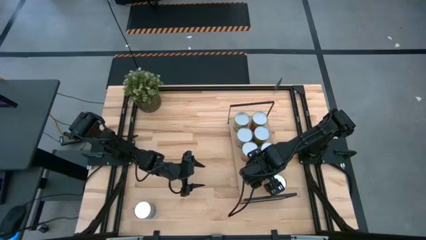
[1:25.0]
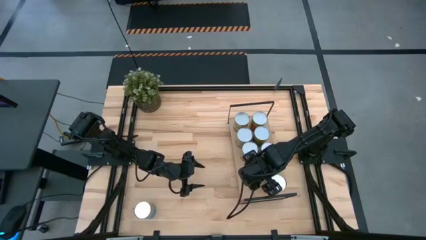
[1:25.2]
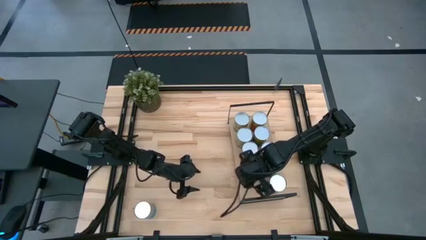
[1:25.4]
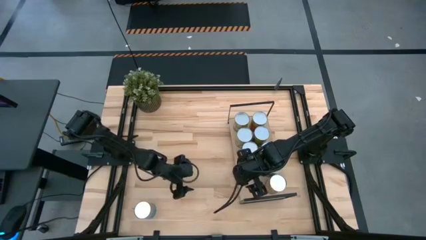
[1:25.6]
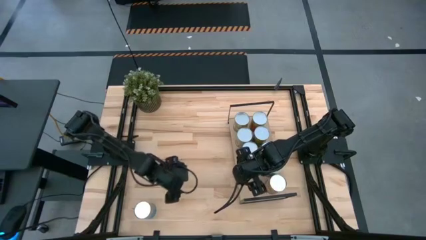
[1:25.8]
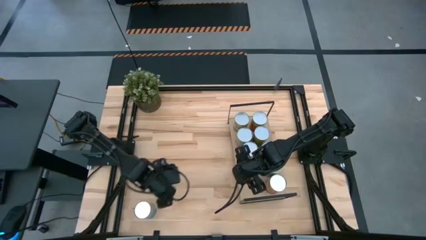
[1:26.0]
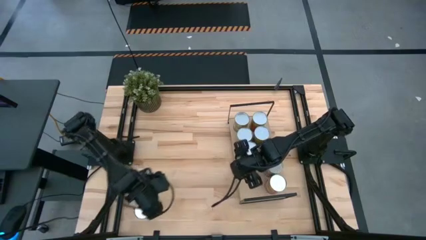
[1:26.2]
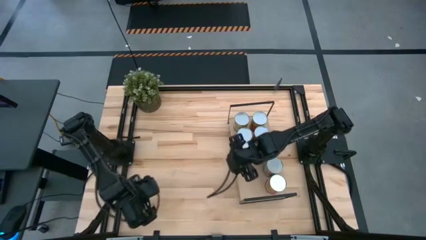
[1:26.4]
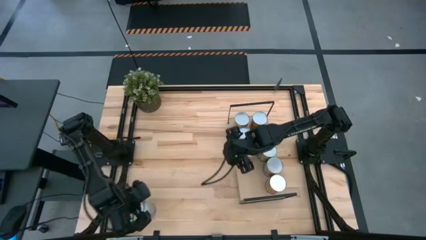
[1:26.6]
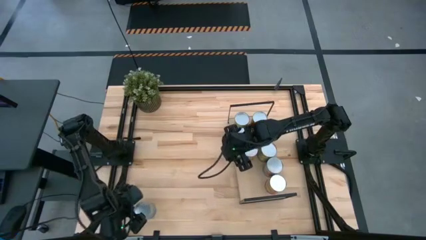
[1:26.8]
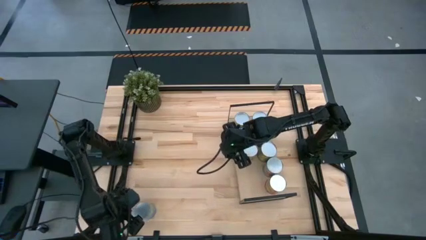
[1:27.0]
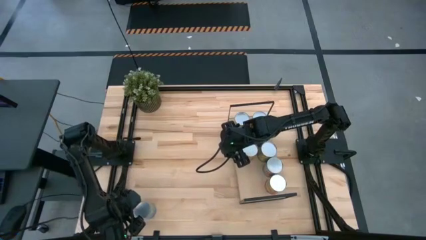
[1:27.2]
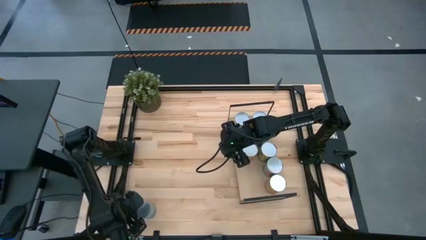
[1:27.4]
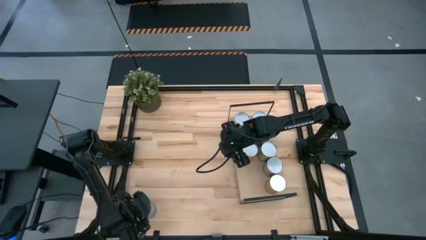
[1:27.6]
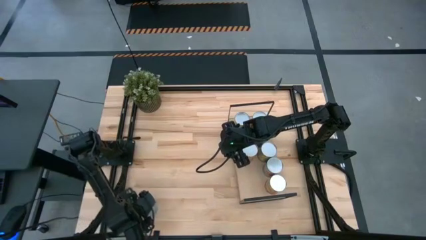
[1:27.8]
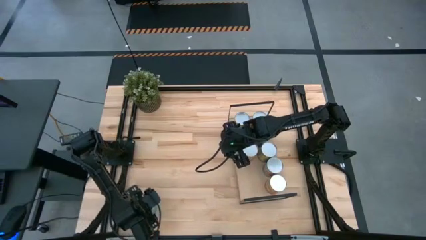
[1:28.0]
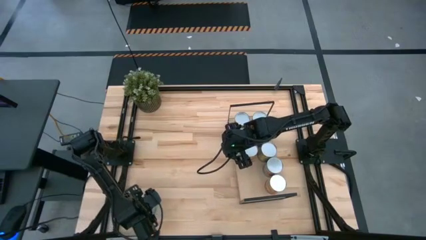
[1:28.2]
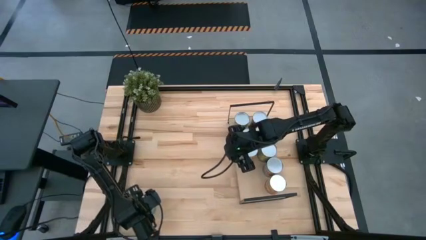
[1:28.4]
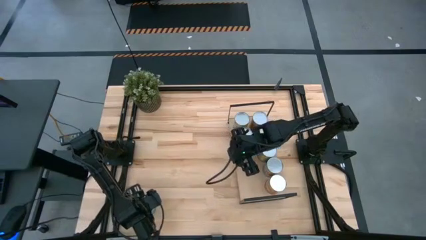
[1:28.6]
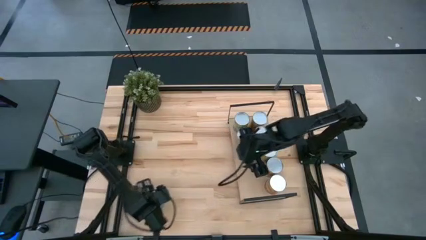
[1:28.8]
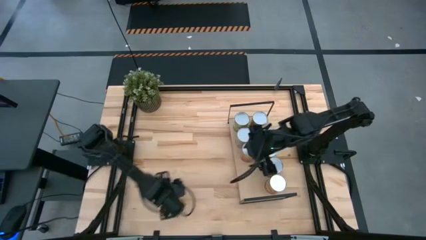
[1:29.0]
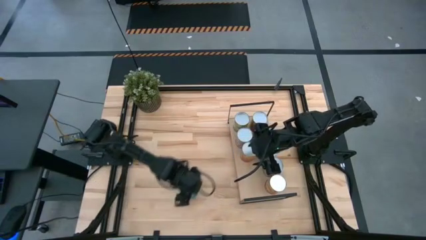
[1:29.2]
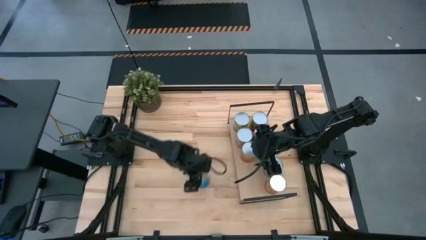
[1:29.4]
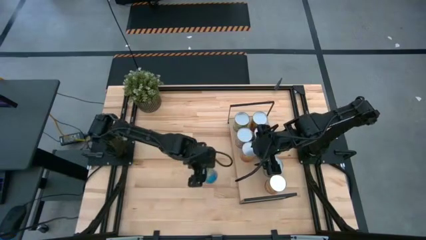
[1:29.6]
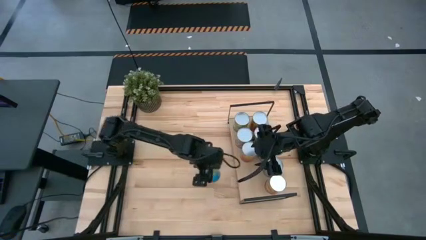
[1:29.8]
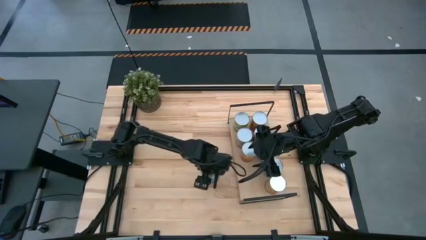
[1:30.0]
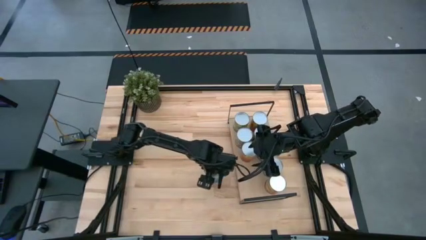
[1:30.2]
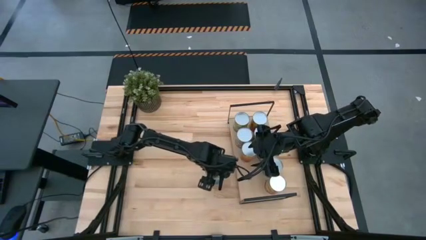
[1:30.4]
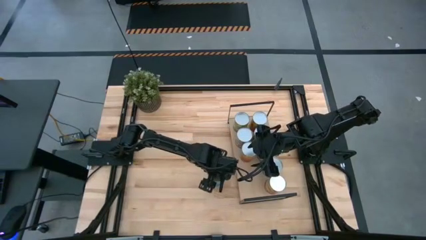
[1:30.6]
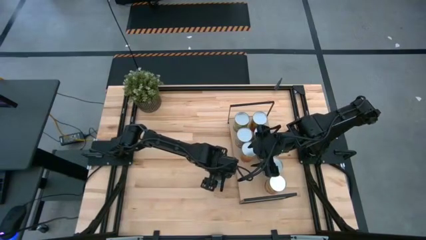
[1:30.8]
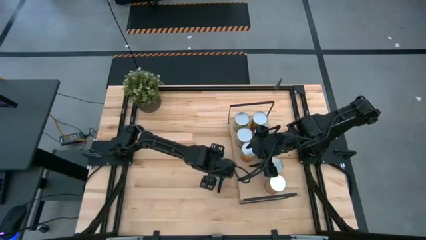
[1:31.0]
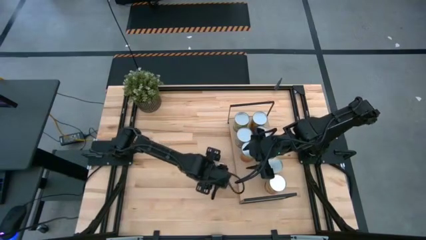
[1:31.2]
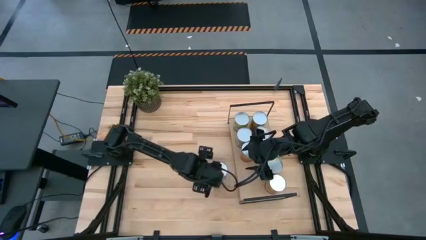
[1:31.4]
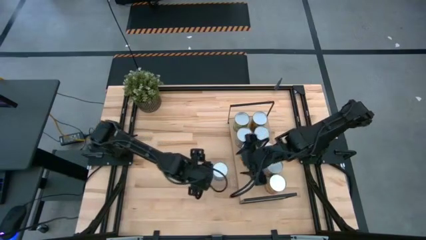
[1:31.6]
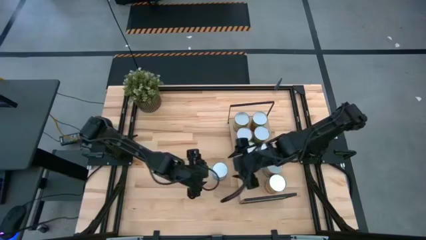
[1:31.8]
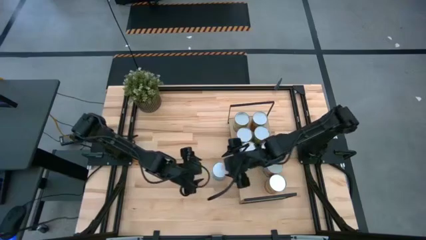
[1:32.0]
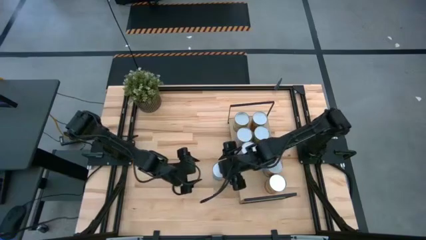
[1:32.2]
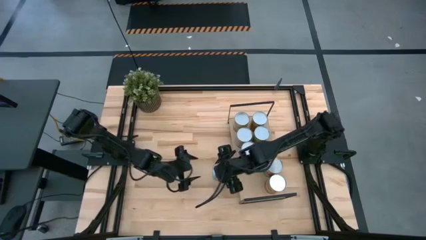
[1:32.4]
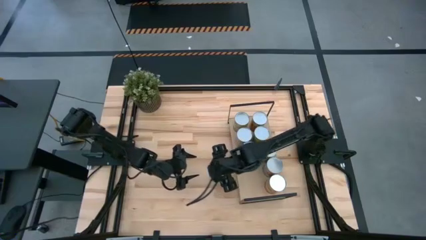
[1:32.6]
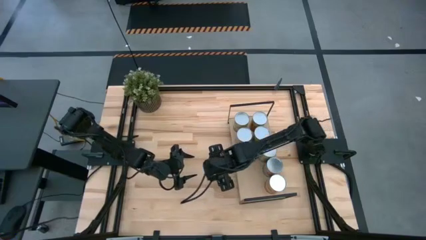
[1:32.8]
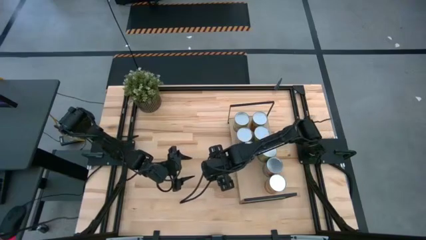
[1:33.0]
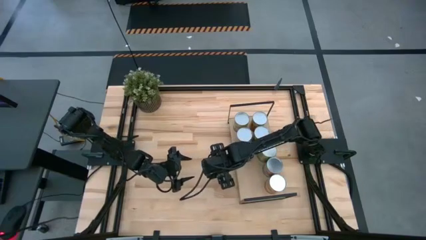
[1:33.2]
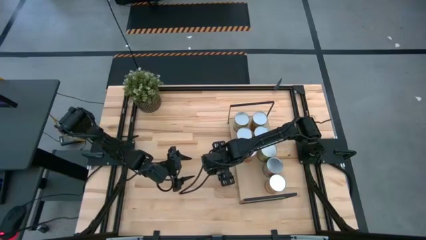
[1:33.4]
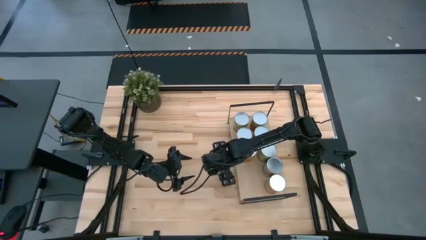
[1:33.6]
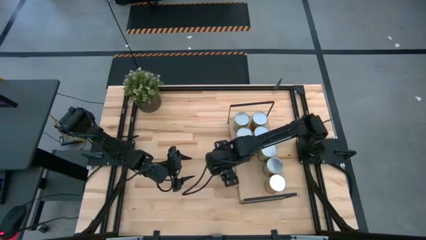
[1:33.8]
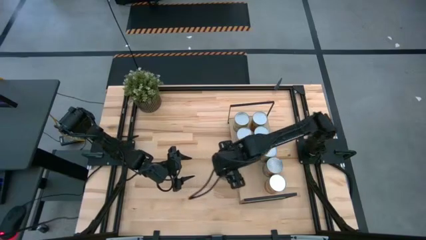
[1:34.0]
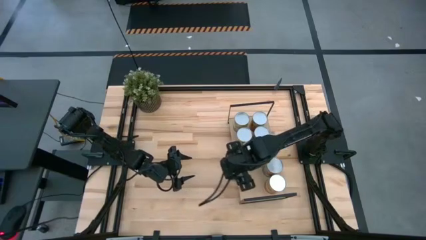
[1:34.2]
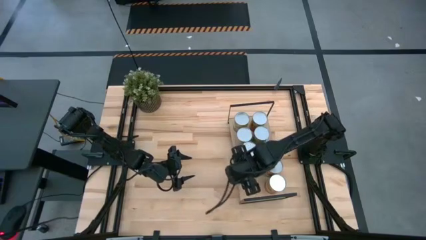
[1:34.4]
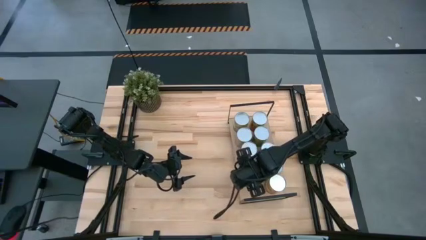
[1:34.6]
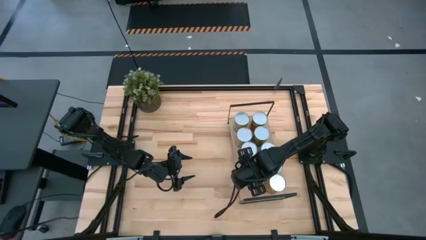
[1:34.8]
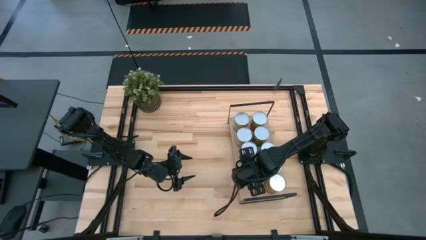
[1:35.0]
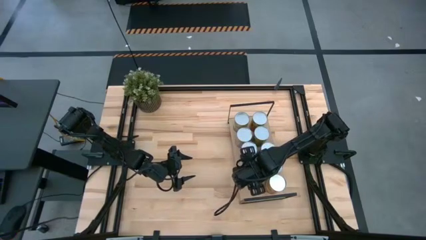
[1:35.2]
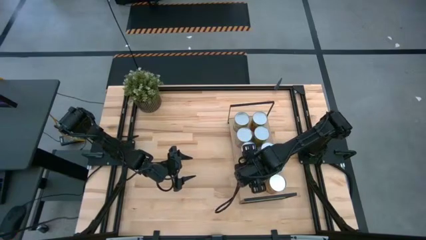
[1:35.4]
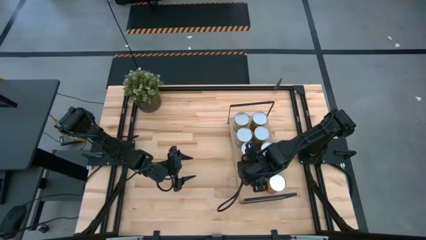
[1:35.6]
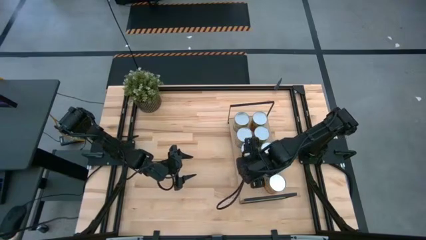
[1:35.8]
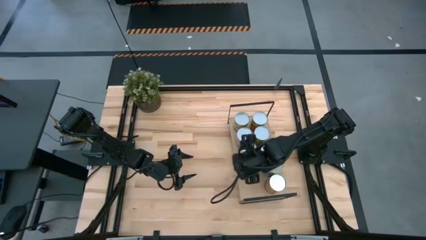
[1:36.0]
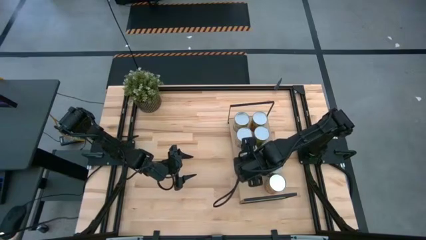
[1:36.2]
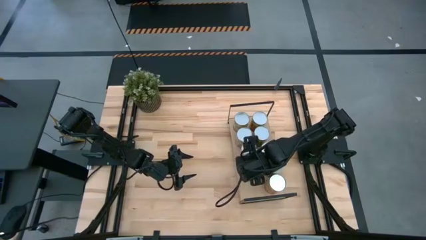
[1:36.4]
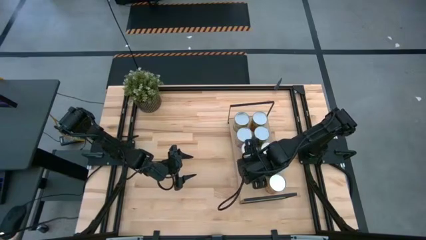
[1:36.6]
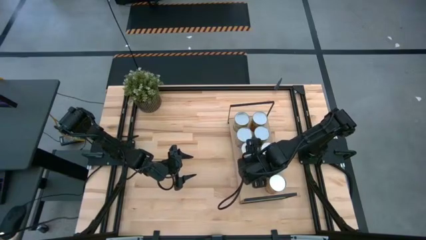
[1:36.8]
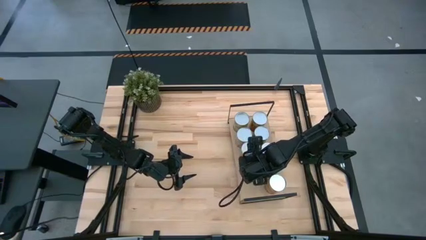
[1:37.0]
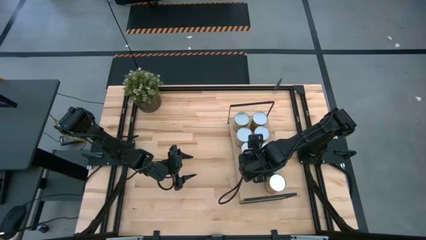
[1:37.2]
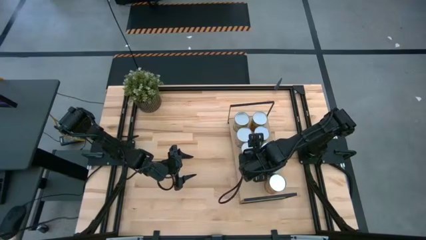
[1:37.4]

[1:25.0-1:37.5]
Task: Pick and place cans onto a shelf
Put the canned cherries on the shelf

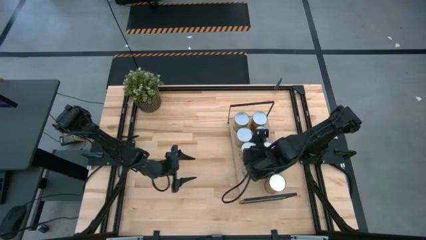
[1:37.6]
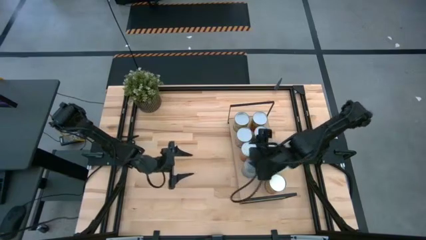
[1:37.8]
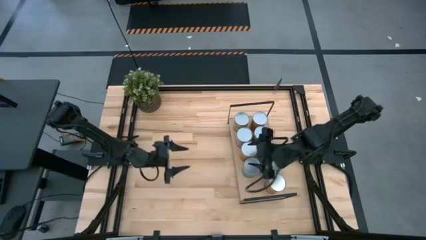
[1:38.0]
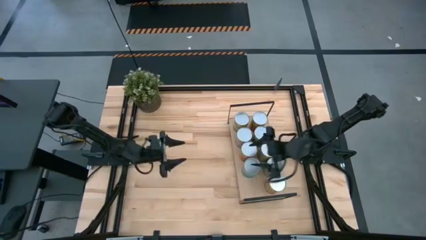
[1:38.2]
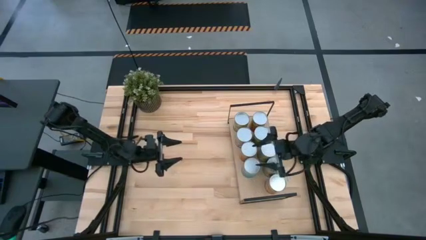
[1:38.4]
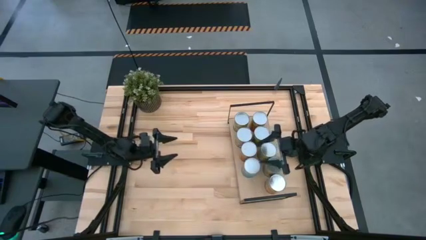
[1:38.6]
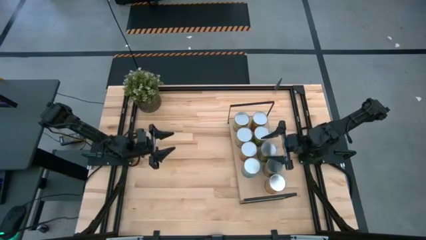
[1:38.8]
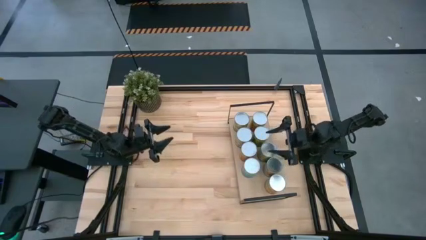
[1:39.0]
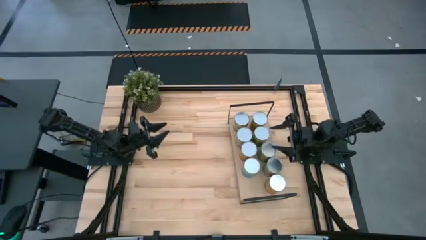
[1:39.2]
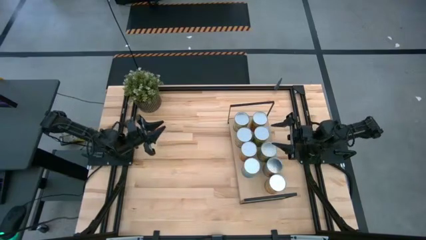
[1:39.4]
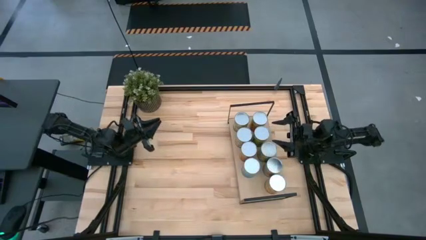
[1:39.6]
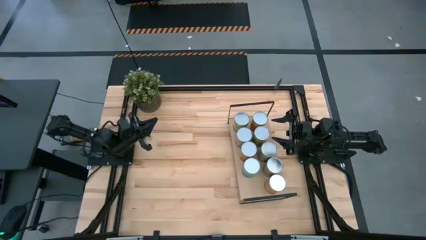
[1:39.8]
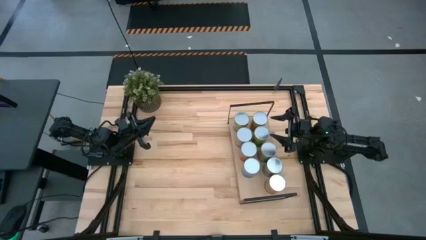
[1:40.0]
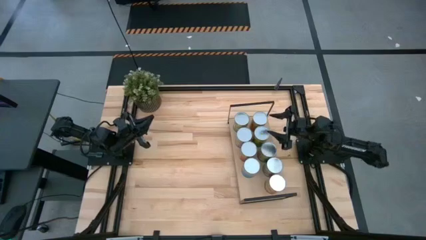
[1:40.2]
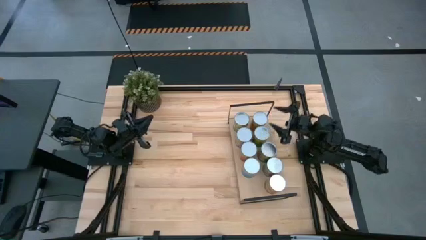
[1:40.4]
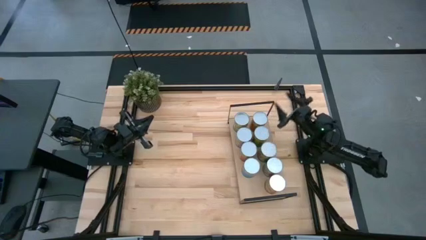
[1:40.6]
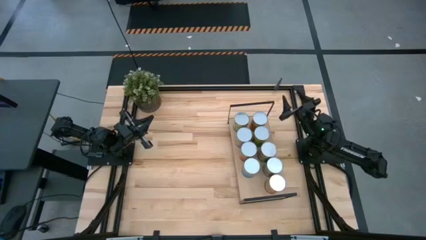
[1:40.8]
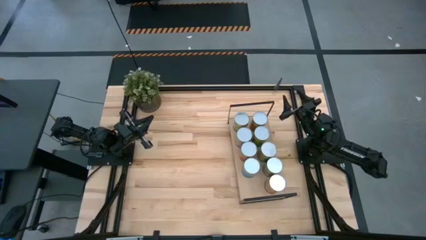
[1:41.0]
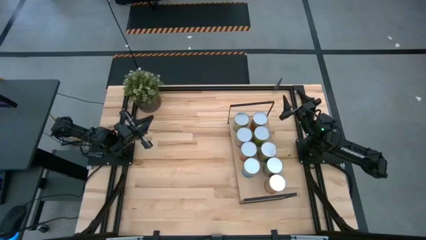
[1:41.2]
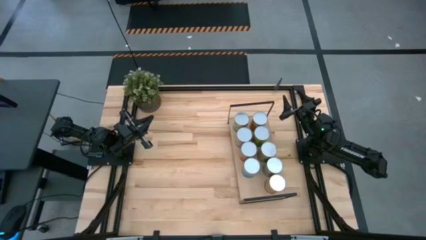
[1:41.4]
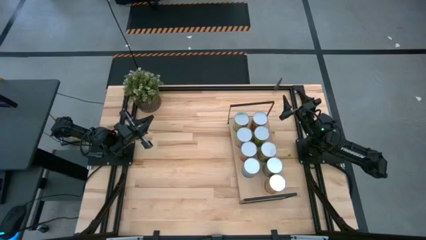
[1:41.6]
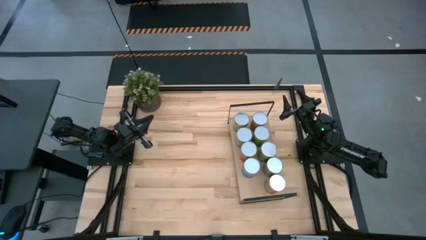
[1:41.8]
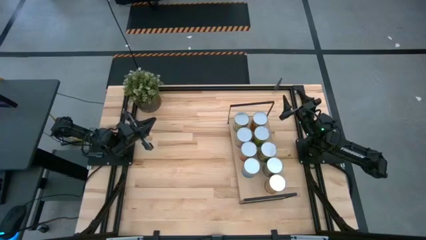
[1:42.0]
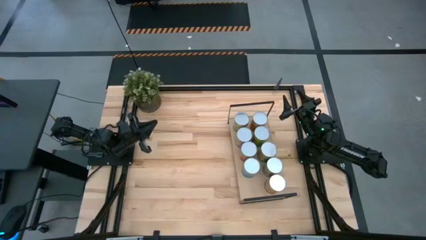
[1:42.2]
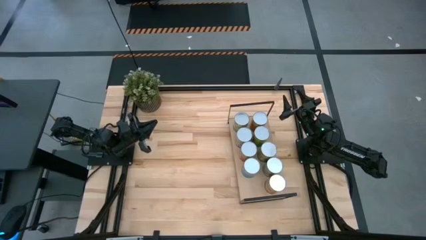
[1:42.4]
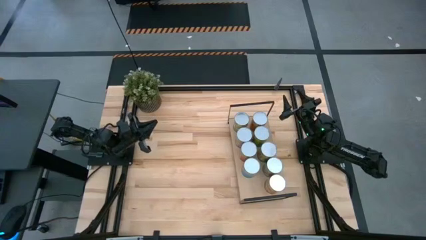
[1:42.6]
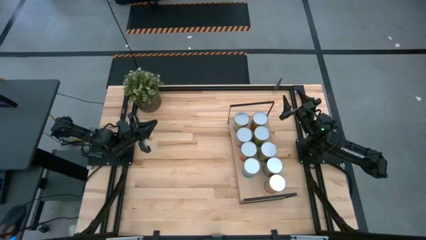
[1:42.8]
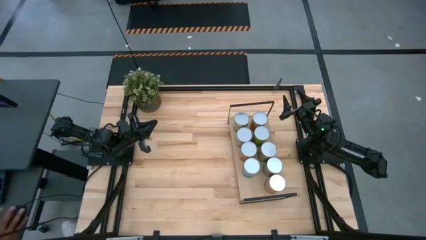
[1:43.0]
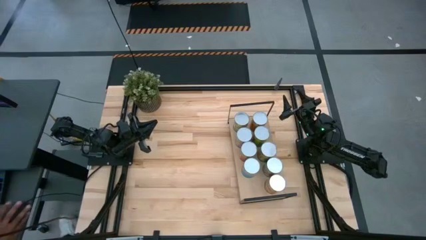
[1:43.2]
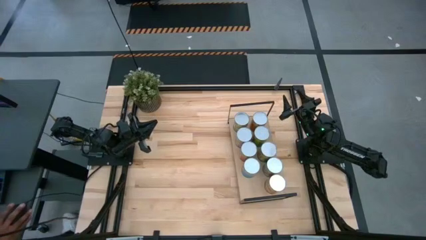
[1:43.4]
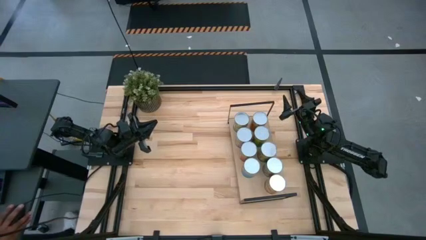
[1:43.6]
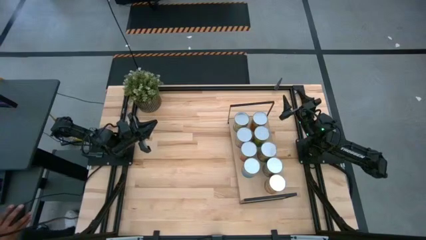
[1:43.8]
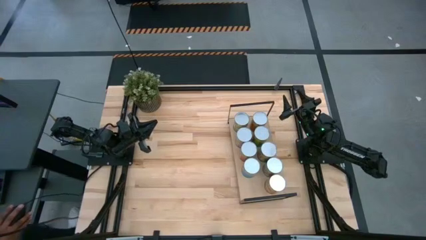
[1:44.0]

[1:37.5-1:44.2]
Return to Home Position
